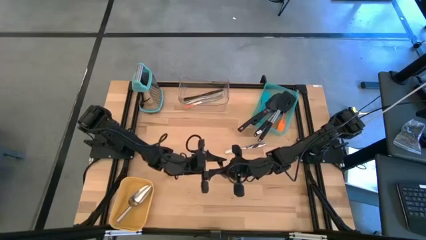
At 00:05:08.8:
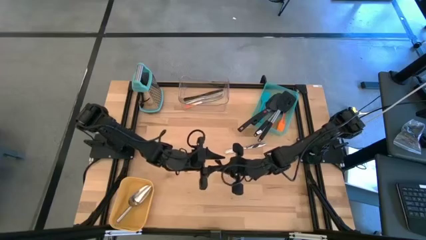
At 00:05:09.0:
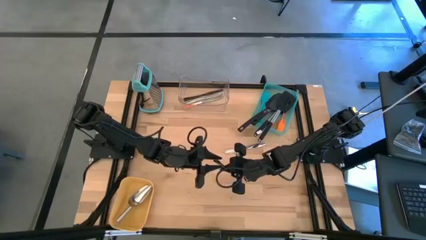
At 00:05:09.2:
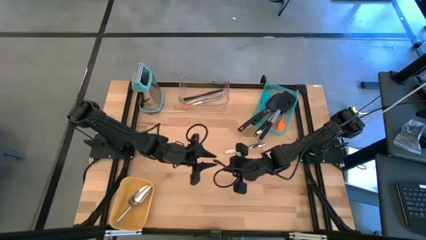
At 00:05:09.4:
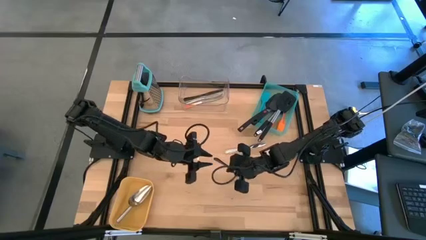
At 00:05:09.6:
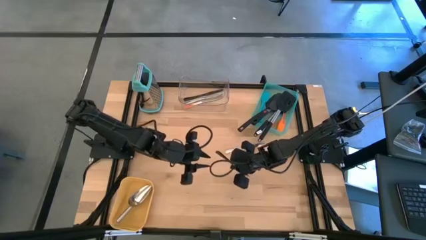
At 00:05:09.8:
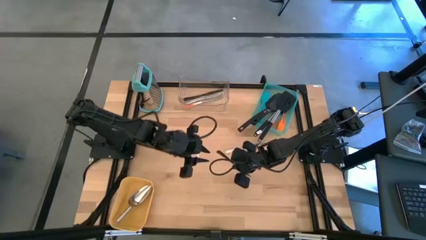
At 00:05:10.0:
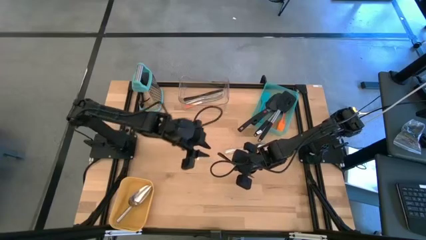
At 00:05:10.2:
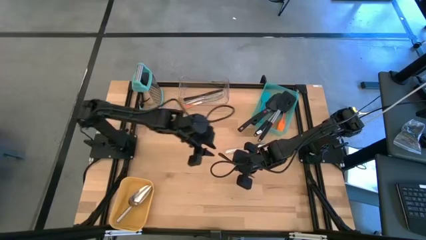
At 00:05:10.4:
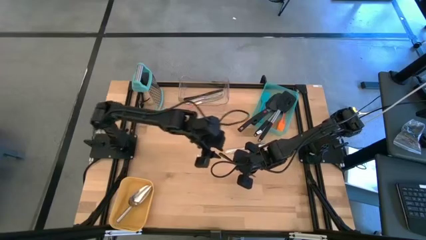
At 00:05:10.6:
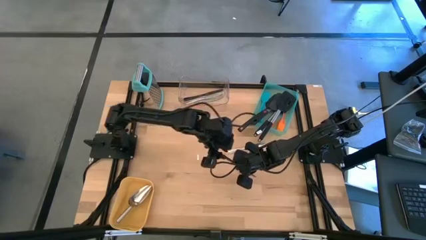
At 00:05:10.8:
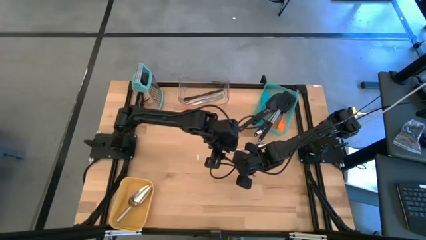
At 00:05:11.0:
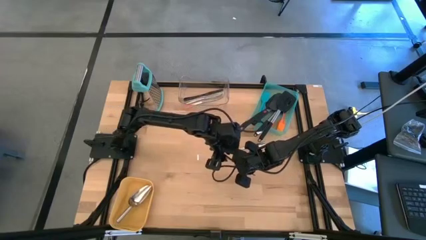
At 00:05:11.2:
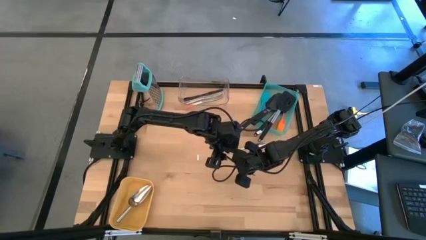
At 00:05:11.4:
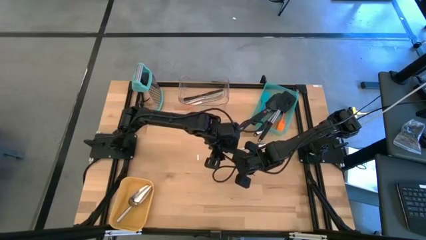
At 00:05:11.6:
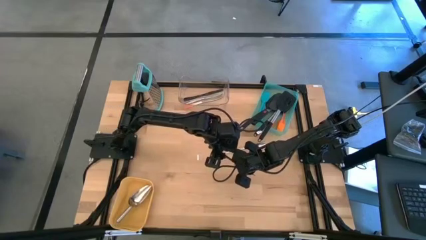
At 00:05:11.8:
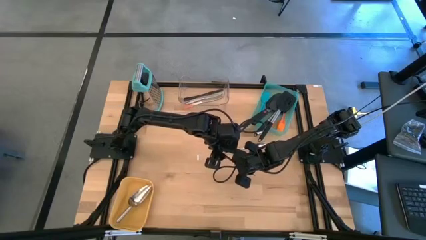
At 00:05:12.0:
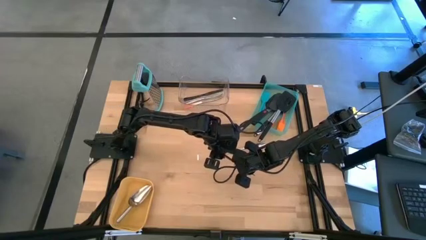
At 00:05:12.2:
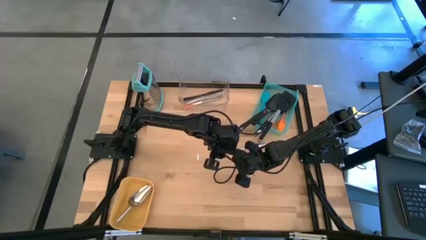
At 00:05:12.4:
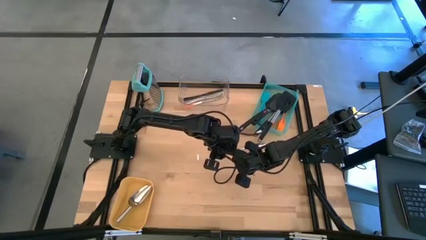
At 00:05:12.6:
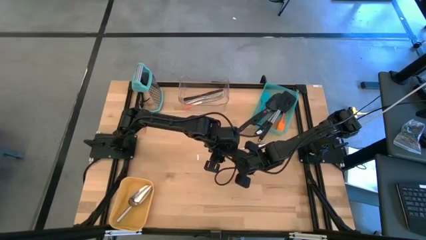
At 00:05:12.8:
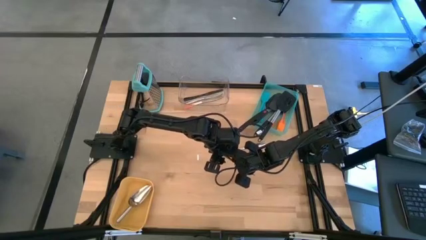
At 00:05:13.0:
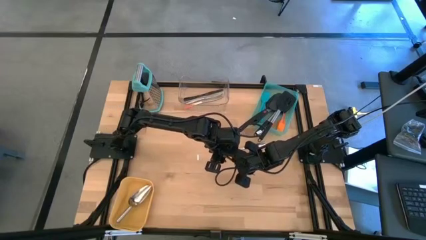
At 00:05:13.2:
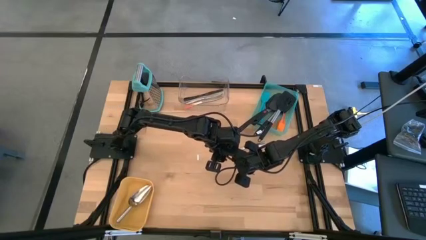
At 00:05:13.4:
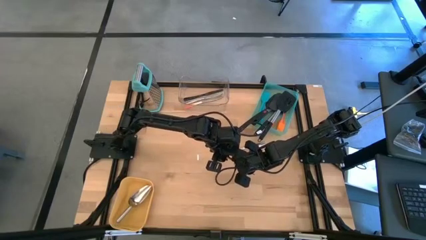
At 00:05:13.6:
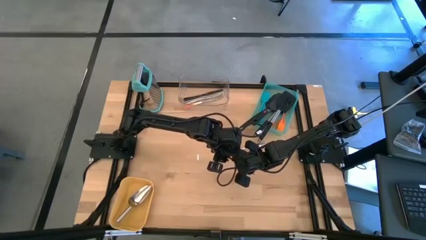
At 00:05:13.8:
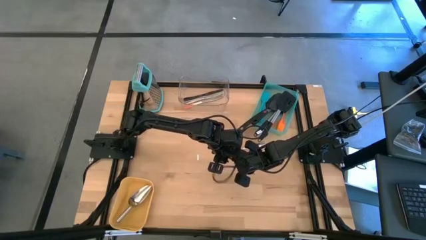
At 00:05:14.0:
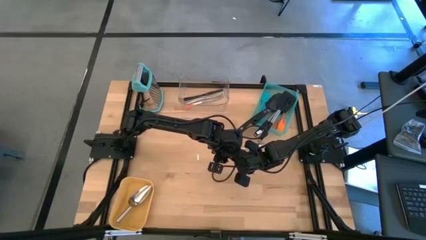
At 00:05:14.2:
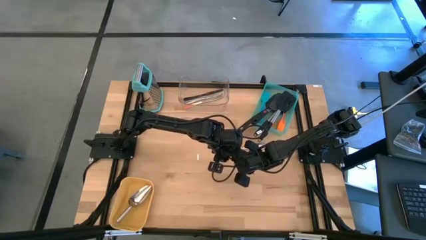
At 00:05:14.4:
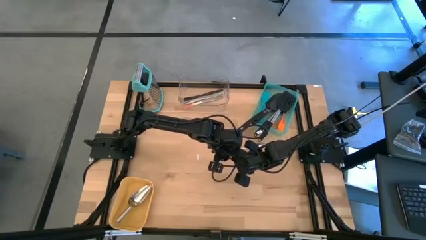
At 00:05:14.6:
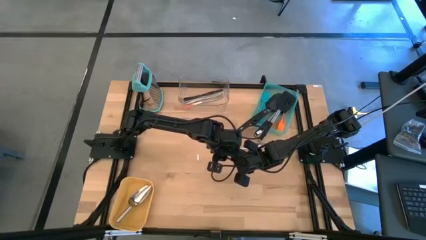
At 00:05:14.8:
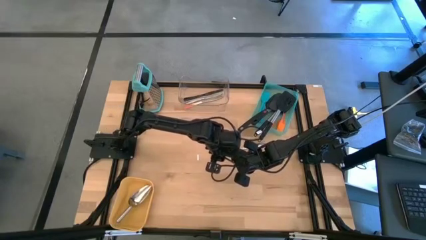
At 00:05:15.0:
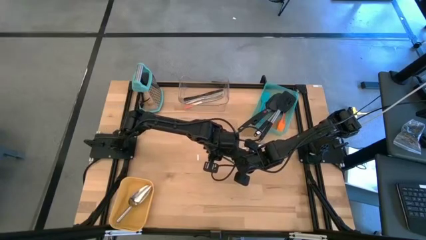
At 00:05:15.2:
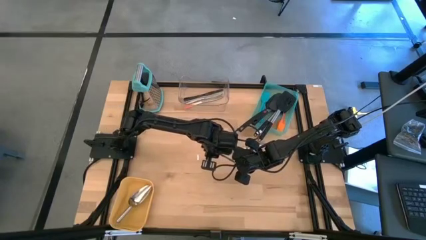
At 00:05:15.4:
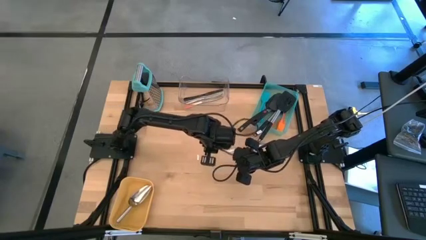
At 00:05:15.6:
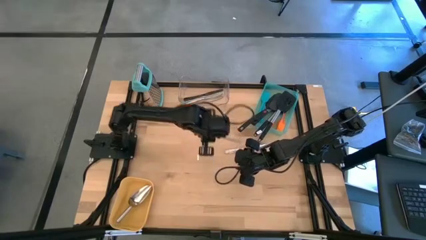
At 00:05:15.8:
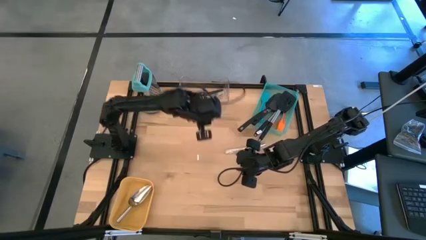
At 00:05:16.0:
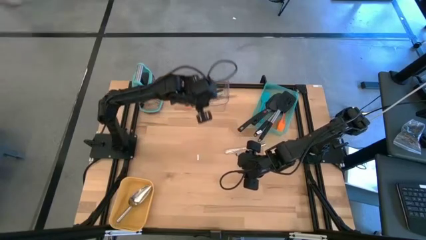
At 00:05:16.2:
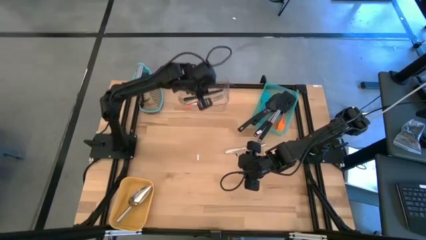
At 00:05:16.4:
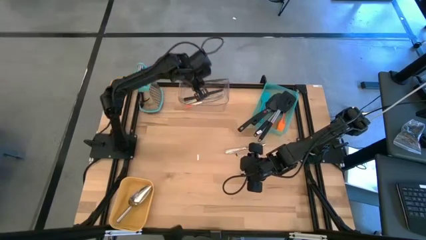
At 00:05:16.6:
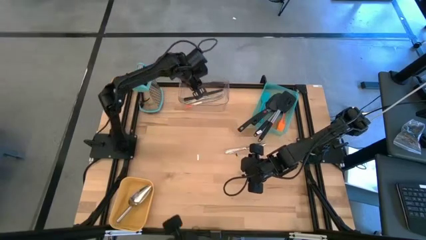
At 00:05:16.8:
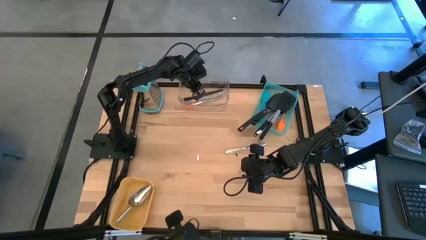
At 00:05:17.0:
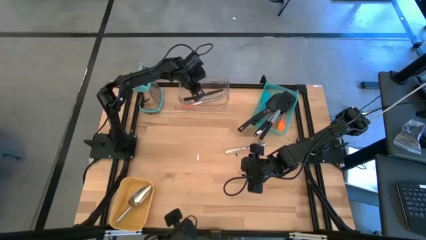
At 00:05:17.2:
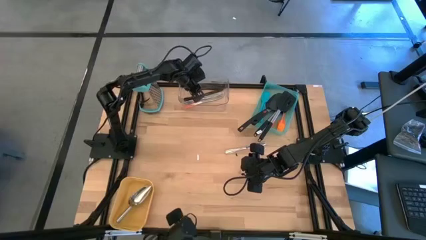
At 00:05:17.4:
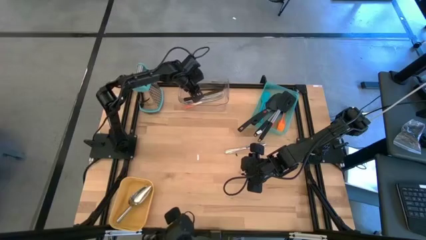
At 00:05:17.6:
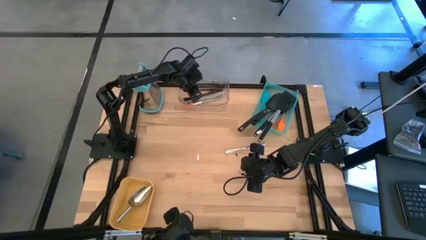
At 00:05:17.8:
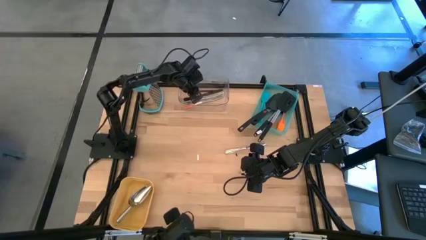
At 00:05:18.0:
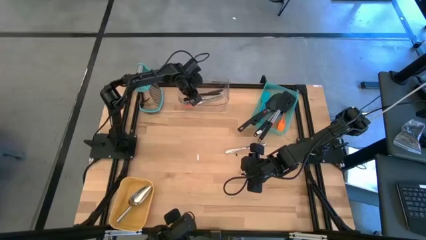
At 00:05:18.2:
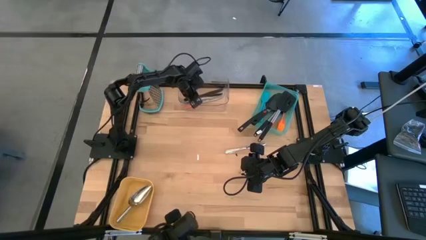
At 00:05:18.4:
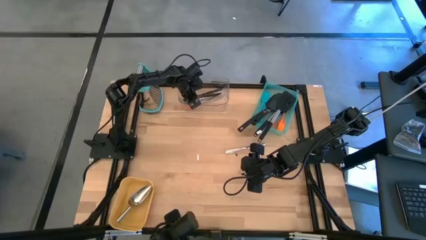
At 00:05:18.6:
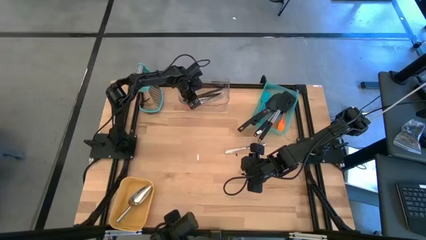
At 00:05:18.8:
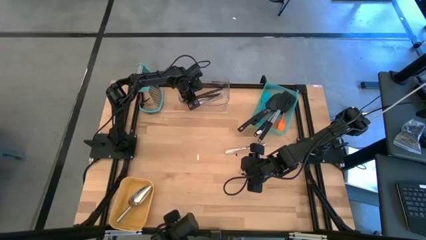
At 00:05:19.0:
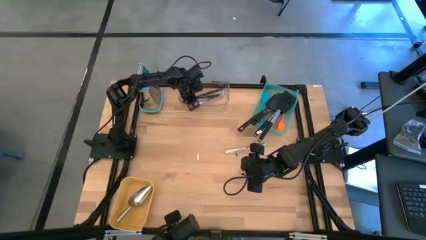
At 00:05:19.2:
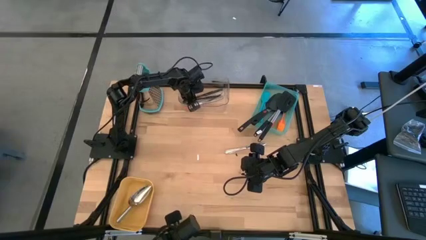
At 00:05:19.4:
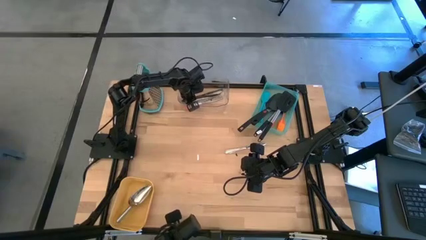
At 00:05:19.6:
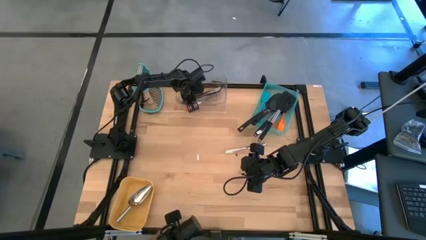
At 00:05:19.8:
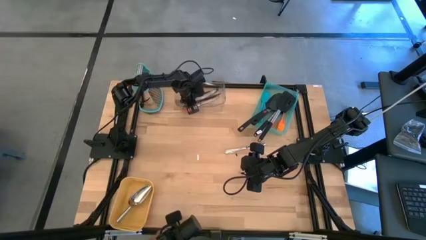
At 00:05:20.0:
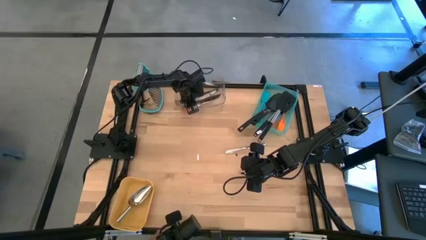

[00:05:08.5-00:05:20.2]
Task: Pick & Place Kitchen Items
Put the black table knife into the transparent bin

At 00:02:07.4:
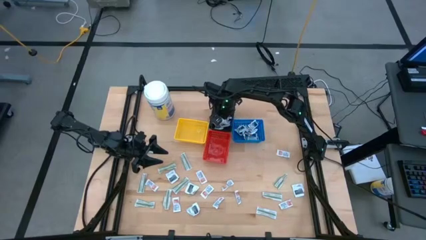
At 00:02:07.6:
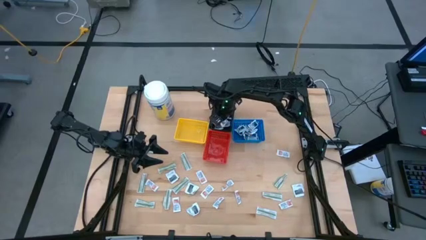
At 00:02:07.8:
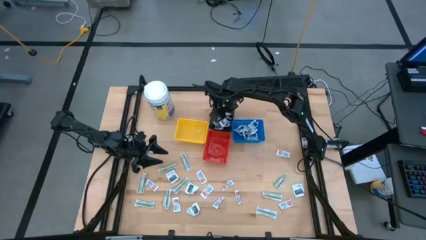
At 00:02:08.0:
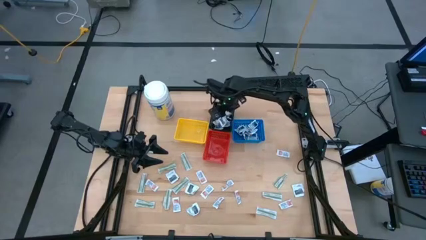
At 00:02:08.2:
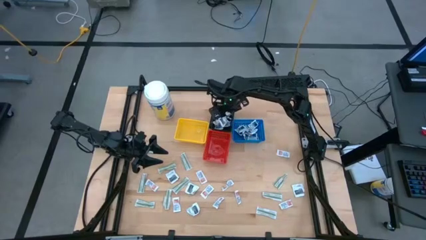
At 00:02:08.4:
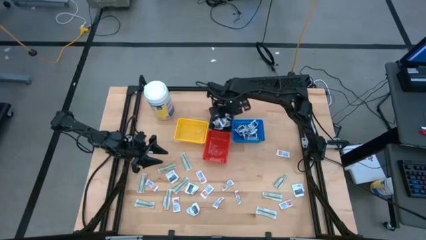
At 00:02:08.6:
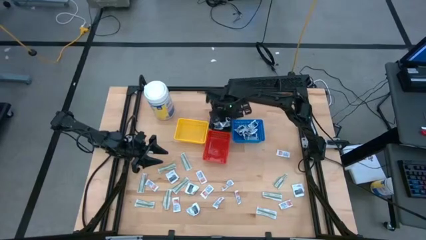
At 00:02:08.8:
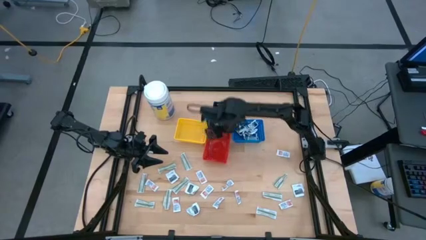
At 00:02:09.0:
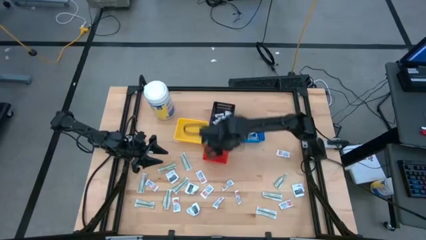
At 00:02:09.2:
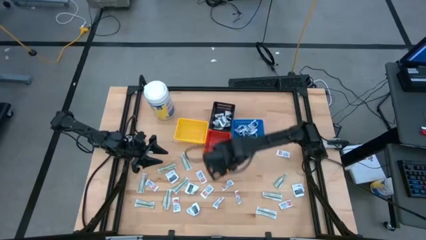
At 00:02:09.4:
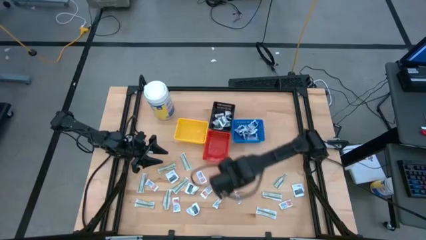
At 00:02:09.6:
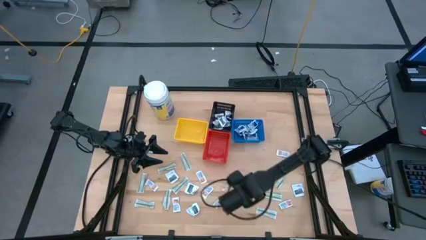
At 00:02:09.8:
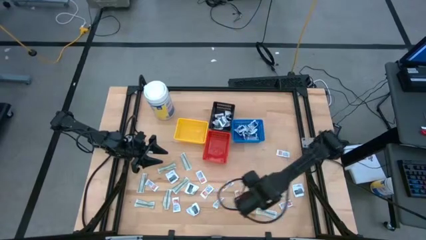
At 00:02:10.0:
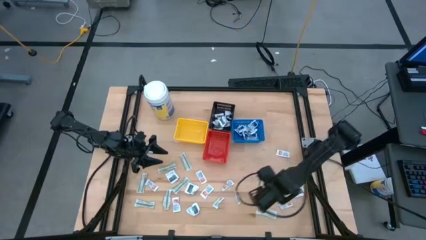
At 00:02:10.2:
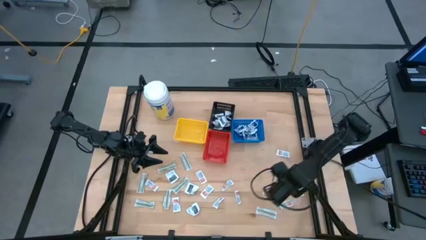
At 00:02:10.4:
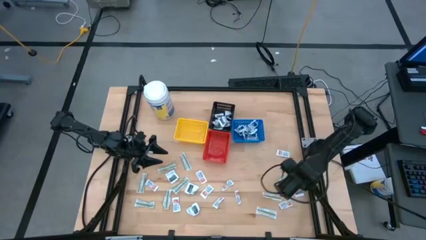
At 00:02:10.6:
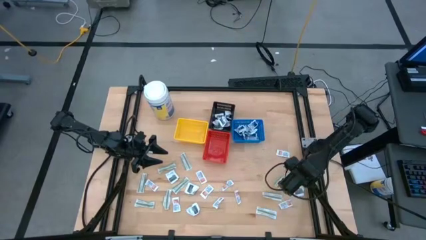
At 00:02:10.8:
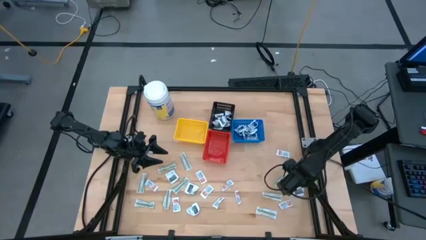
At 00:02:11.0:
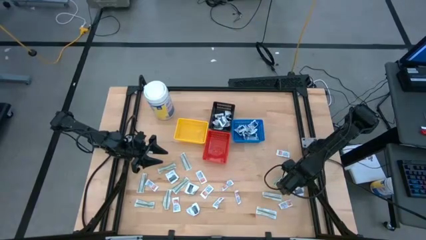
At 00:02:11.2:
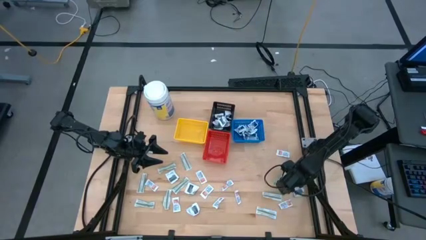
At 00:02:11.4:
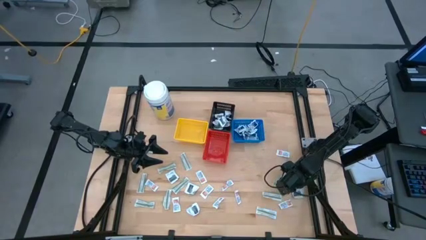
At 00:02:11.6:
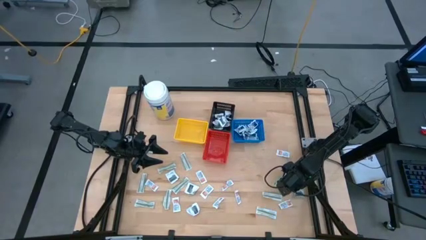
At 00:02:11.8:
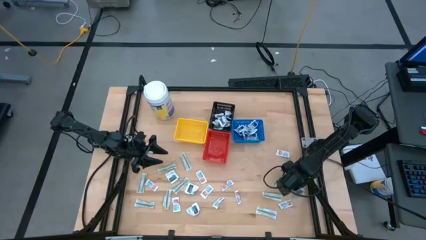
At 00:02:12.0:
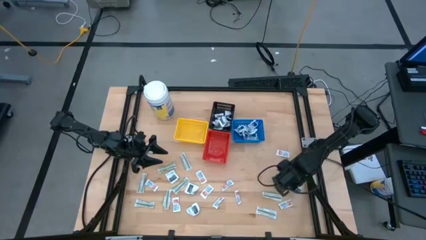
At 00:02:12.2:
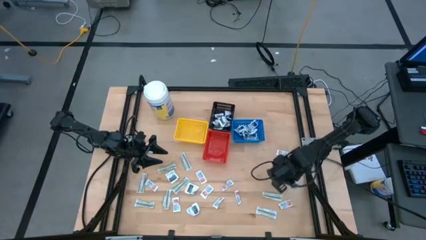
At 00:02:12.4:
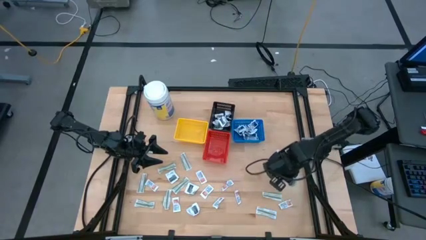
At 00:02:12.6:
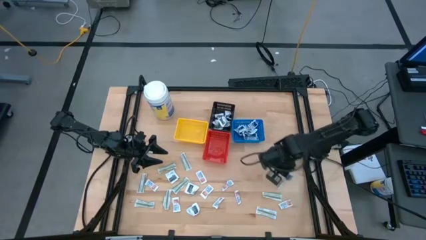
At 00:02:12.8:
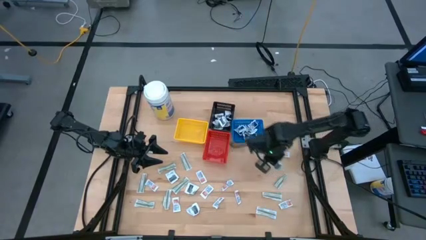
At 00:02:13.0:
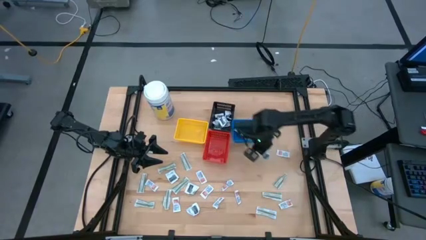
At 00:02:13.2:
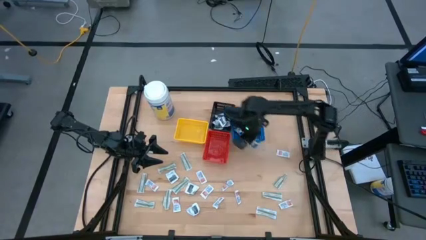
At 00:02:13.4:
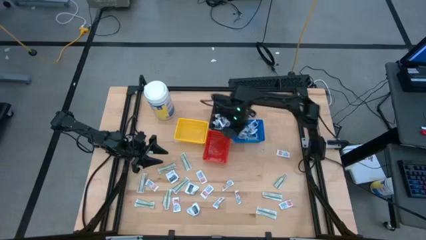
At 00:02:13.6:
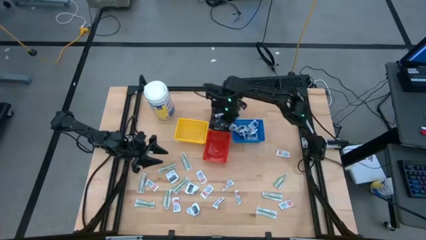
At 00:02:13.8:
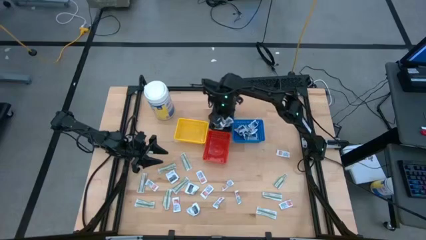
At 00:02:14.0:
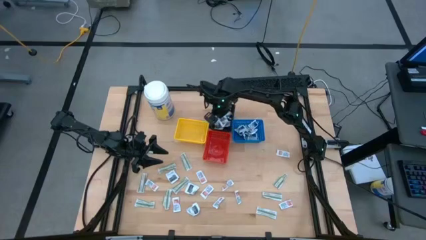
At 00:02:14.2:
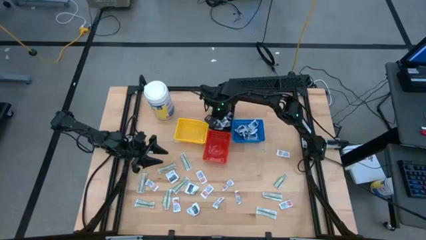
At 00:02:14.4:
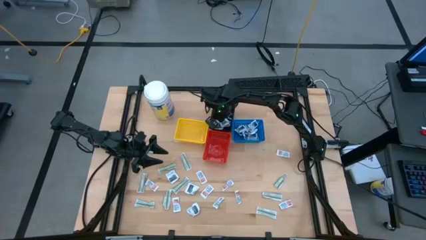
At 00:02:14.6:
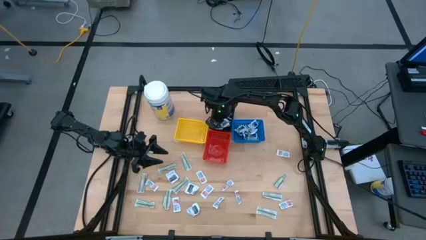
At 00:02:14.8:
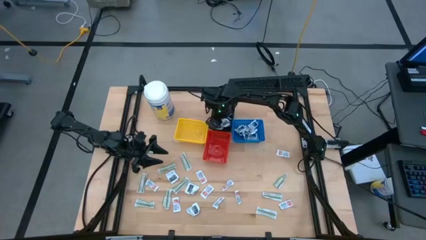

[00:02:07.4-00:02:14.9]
Task: Pick & Place First Aid Supplies
Put the towelette pack into the black bin
